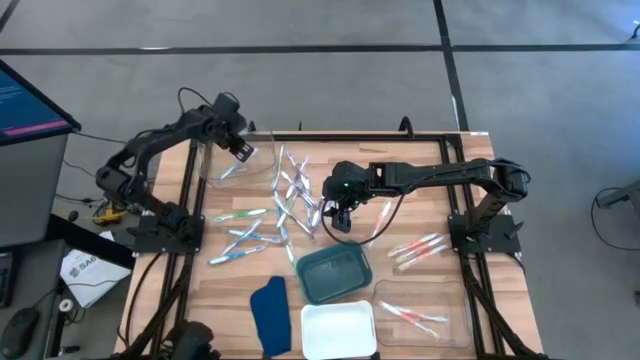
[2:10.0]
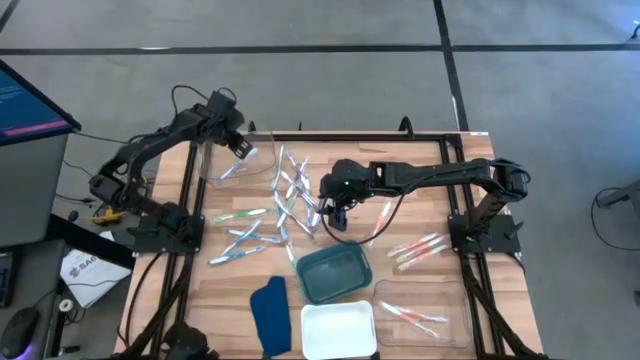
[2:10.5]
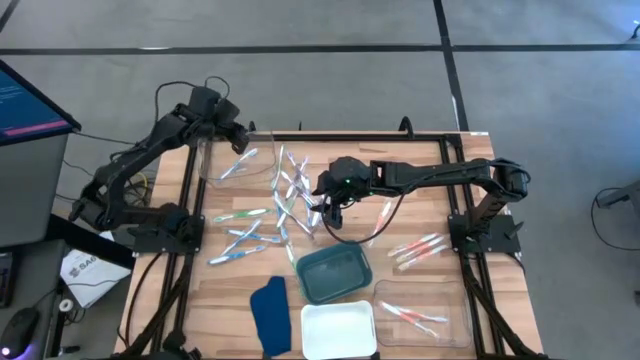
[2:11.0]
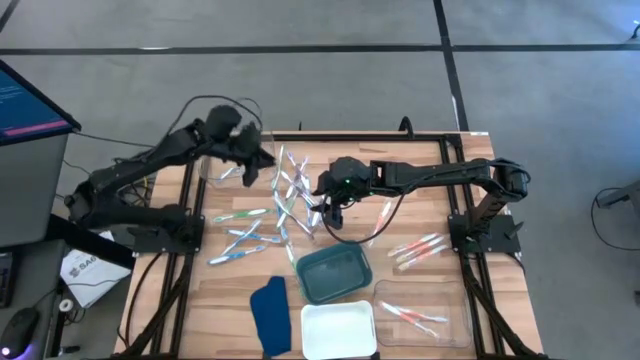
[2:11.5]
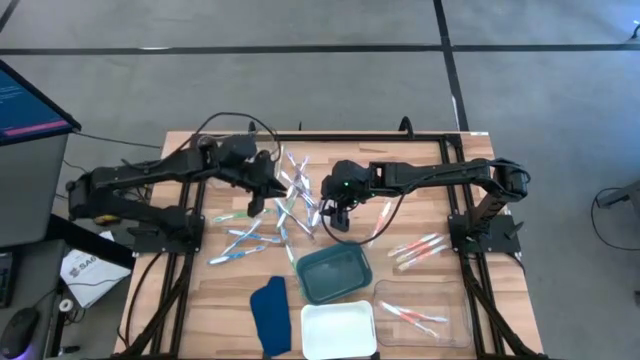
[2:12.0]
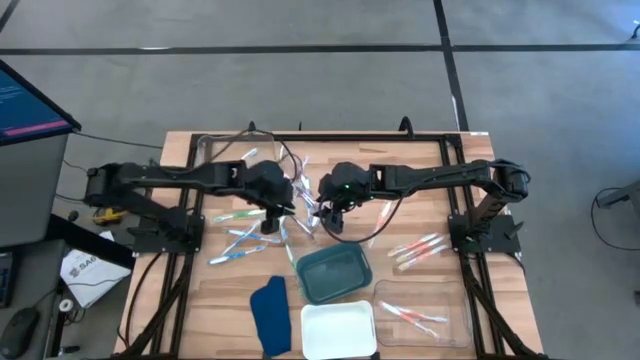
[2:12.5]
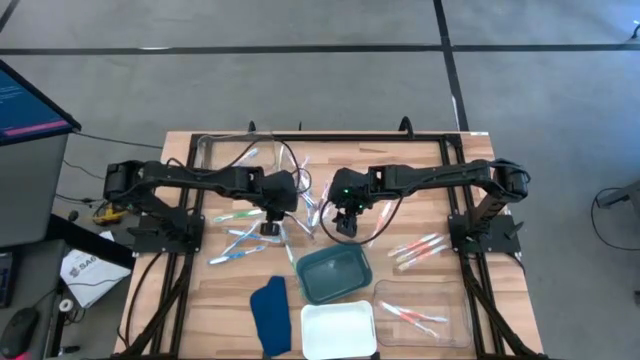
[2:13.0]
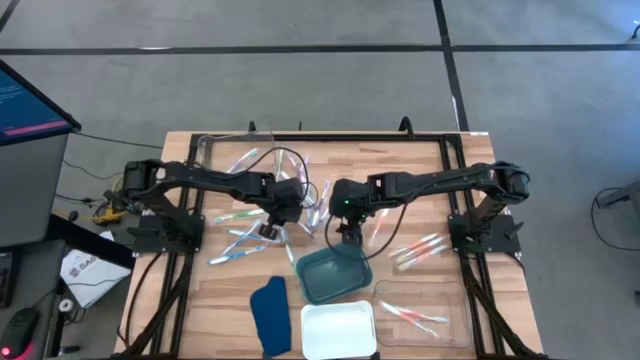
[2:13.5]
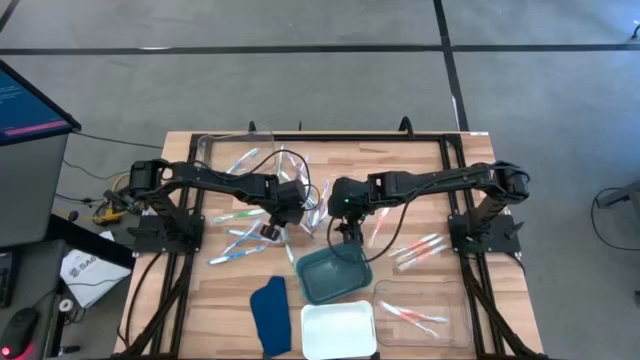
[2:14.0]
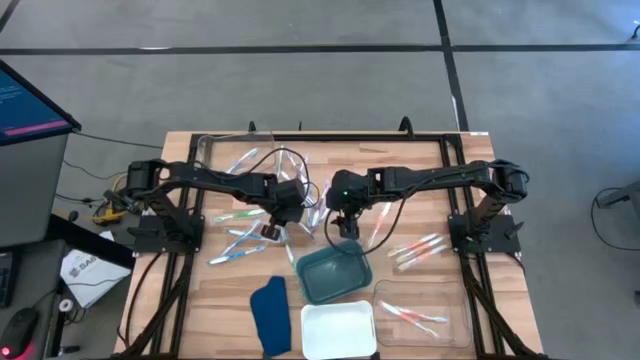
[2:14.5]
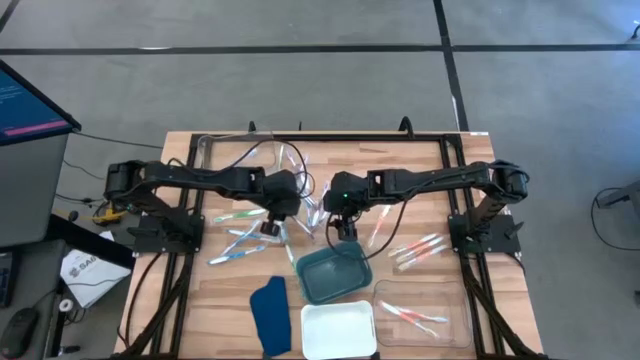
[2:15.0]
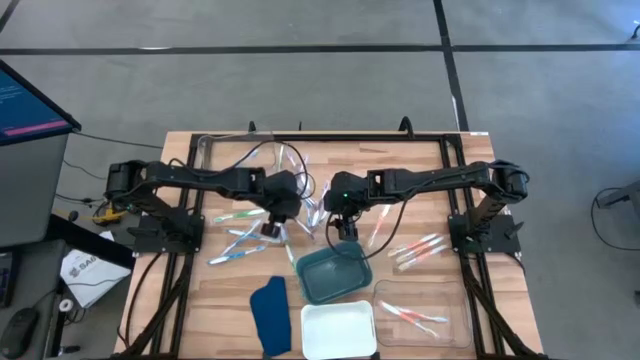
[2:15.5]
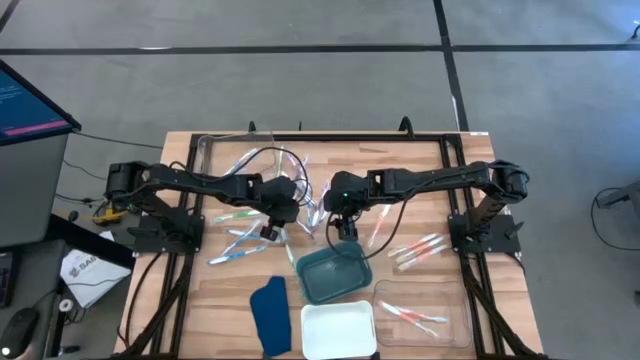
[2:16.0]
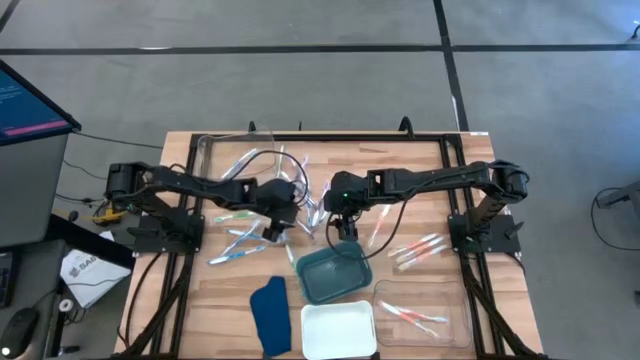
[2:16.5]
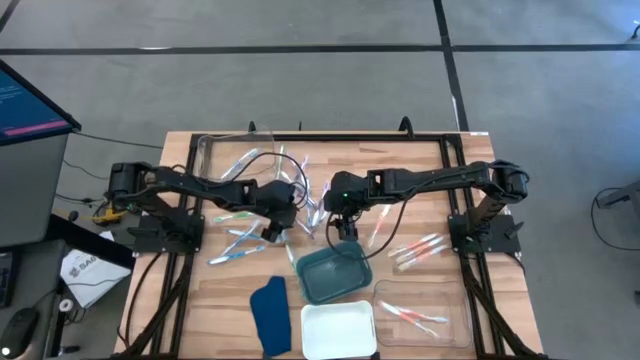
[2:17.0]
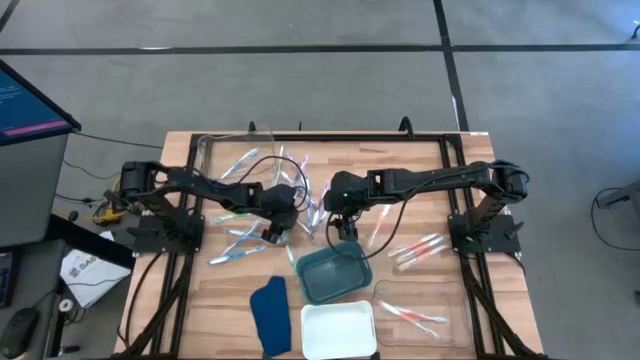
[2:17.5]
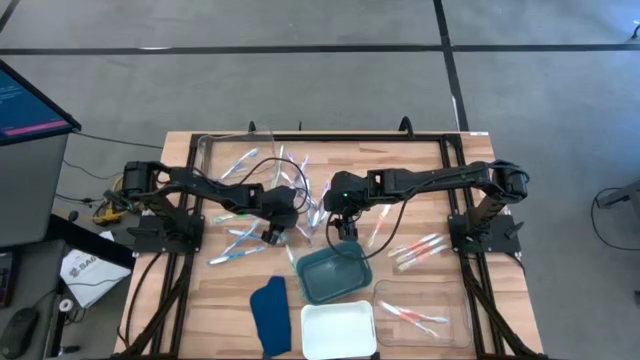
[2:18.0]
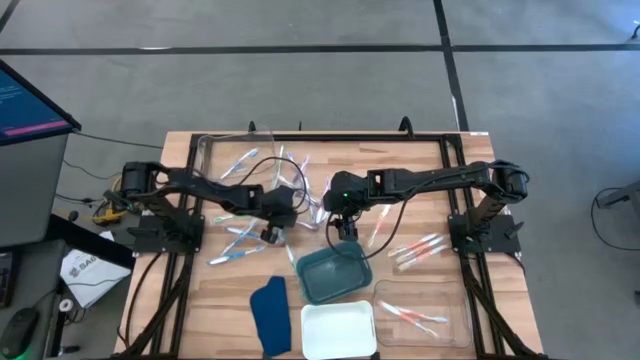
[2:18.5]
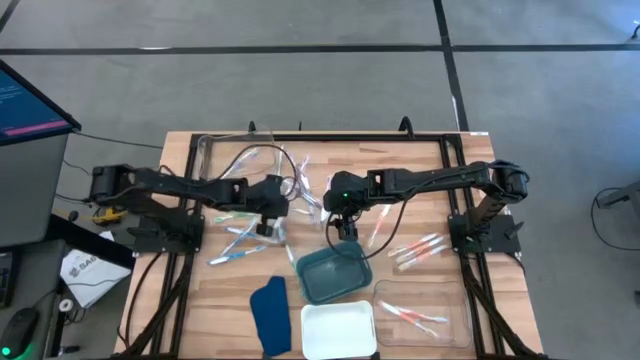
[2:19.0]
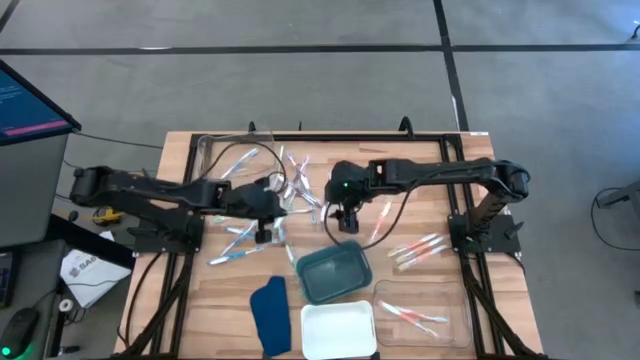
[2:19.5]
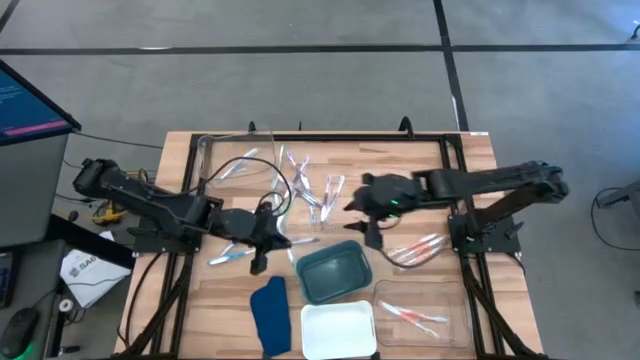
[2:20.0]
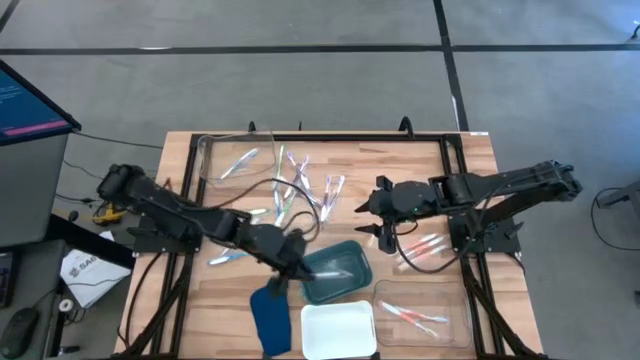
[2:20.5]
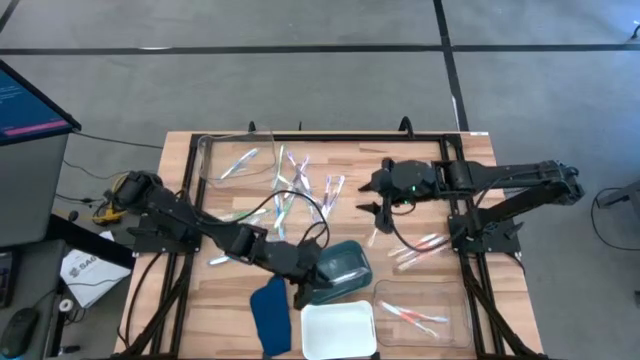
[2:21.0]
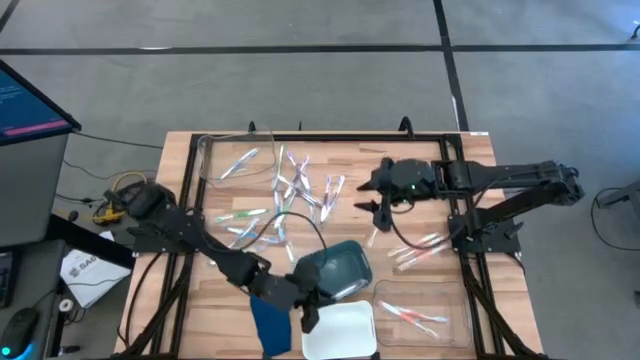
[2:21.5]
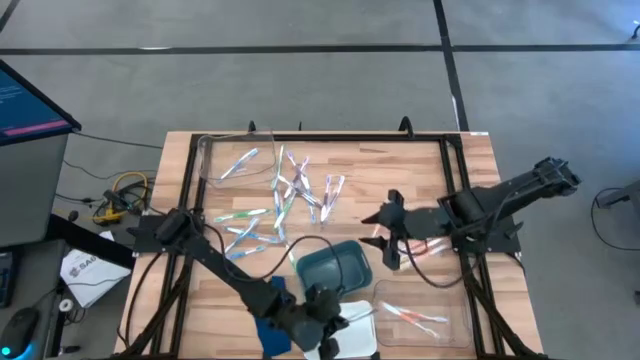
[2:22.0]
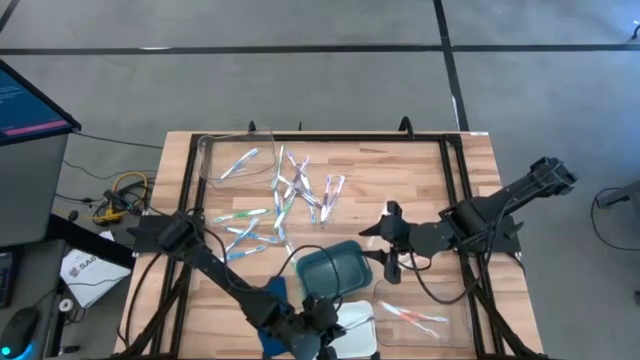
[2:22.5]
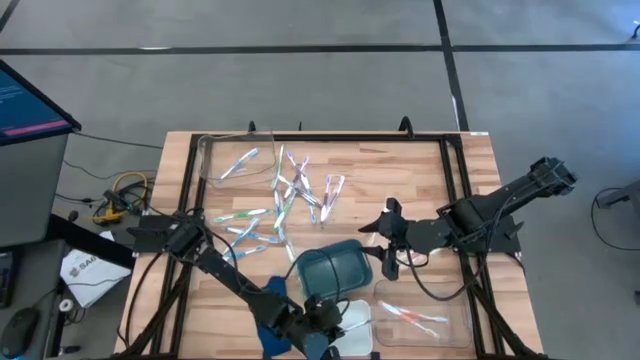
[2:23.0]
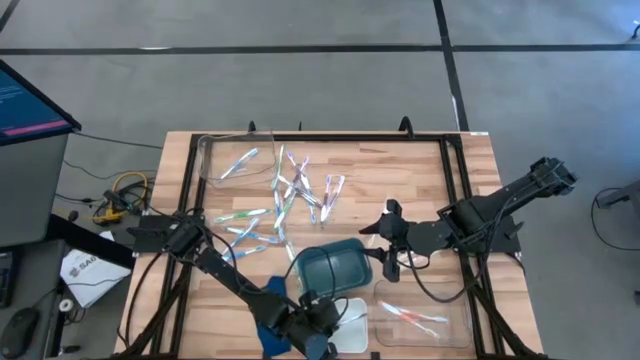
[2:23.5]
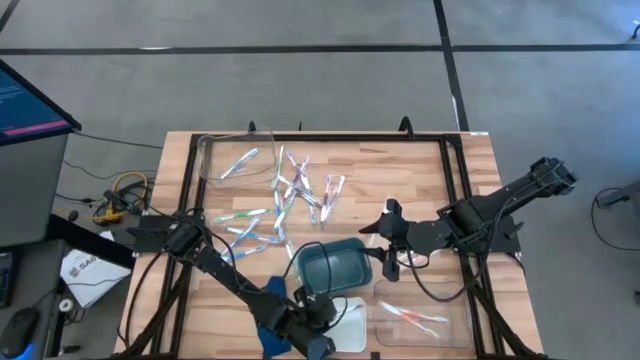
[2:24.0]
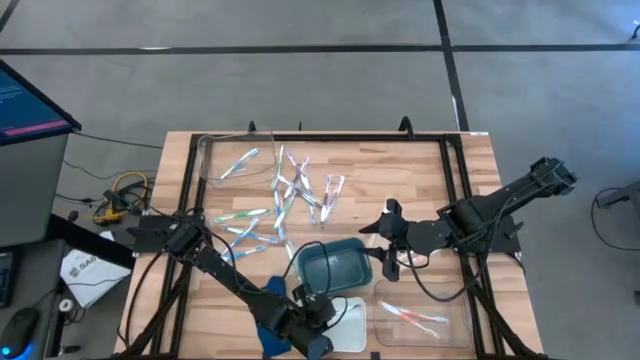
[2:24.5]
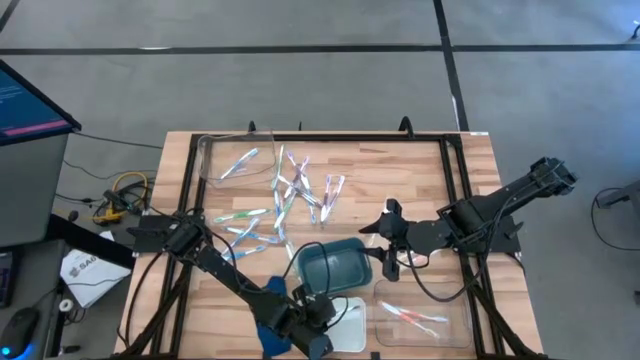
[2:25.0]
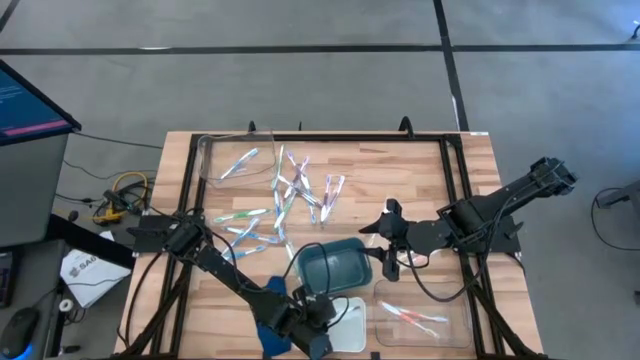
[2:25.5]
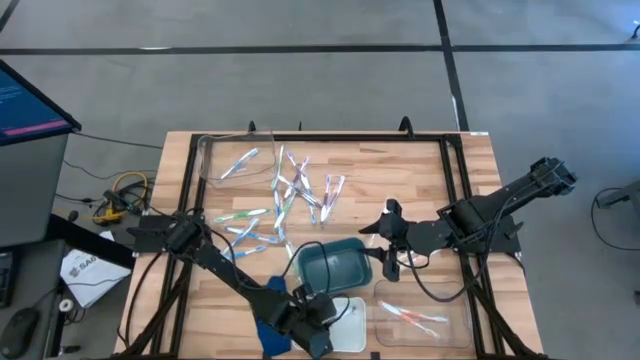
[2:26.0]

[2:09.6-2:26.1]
Task: Pick & Place Toothbrushes
Put the purple toothbrush into the white bin

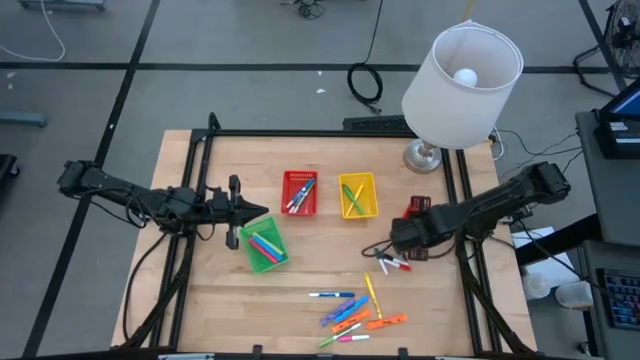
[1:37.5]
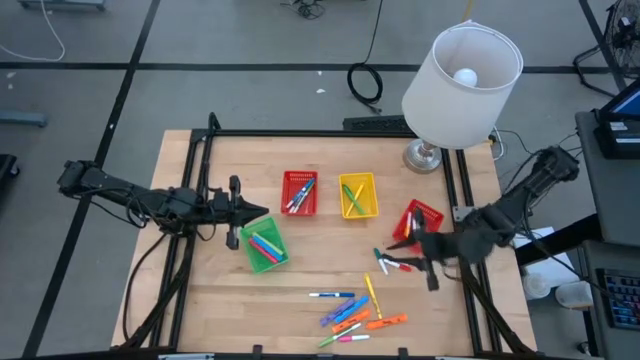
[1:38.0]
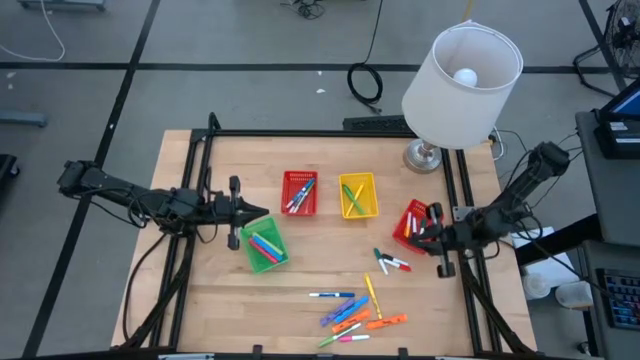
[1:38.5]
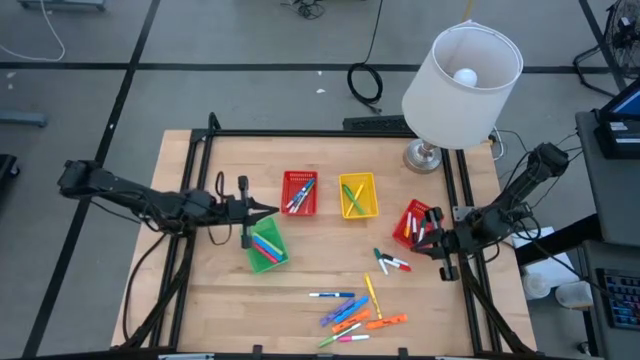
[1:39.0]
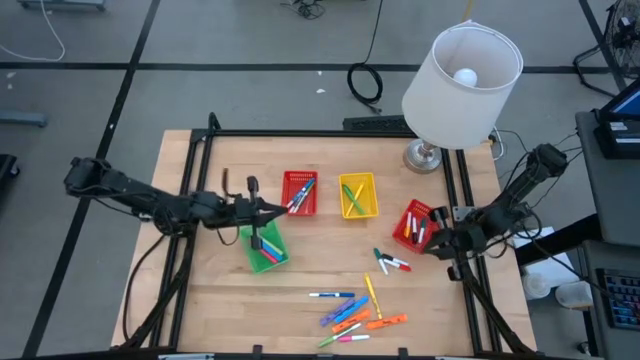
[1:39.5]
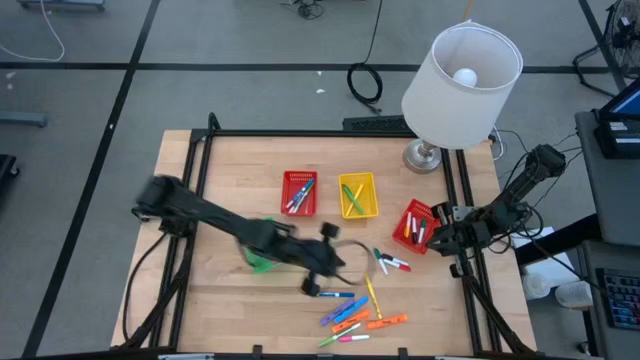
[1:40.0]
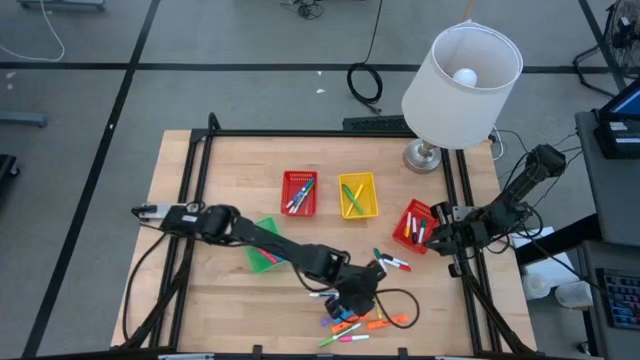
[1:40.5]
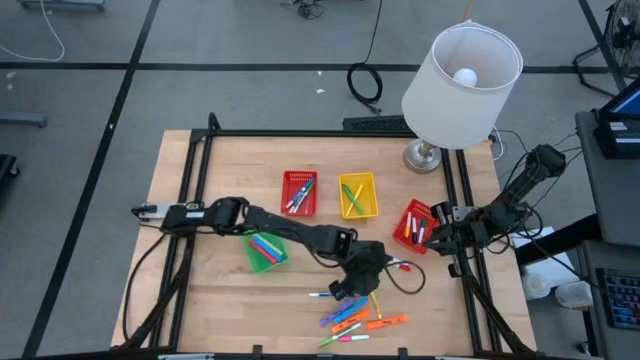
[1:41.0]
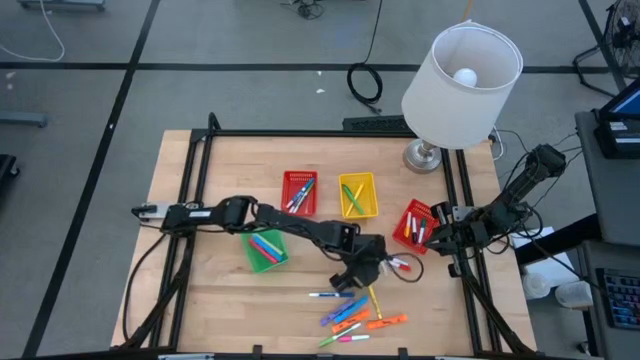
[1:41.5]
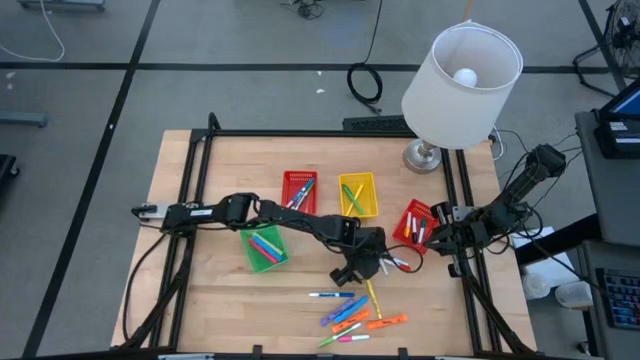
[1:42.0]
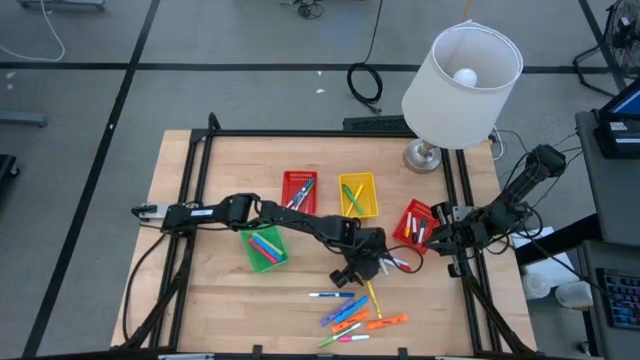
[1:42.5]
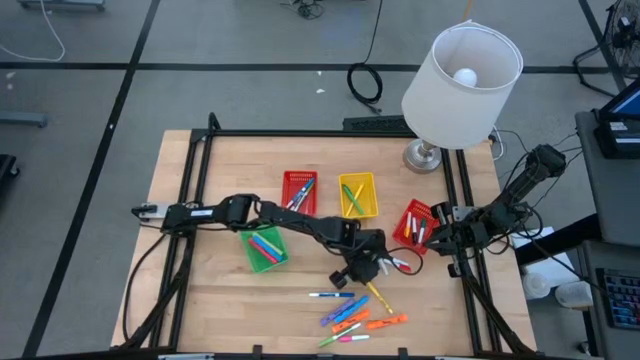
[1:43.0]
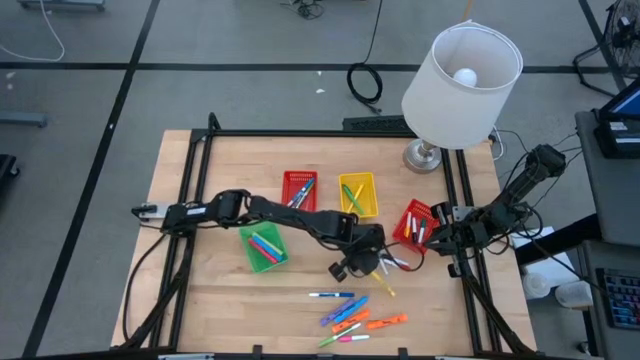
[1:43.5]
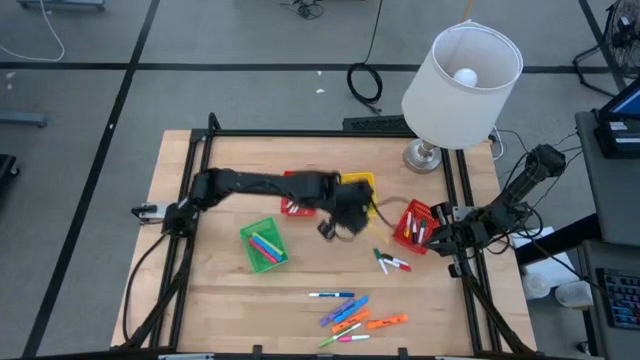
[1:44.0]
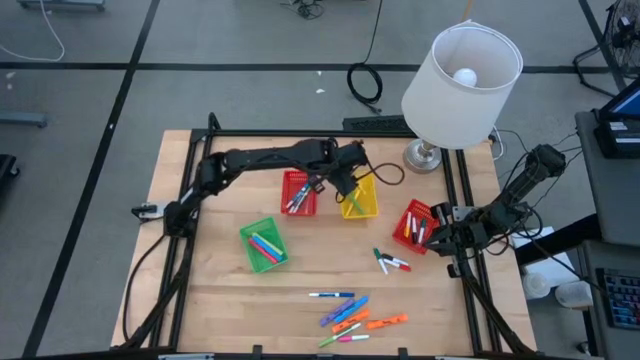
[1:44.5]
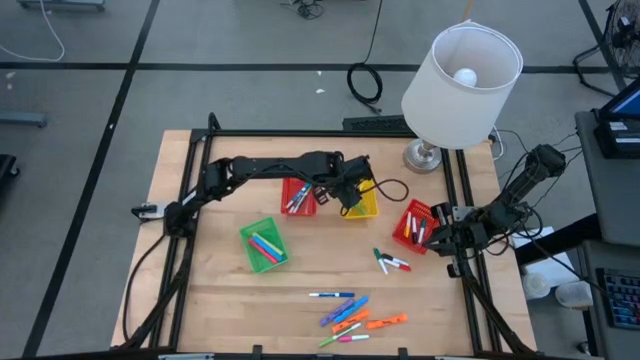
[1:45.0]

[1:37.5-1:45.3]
Task: Pick & Place Markers
Put the yellow pen into the yellow bin
